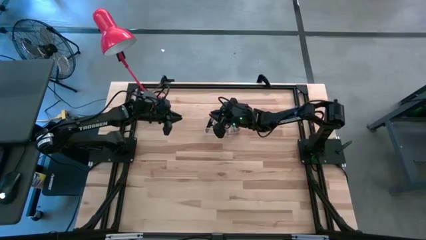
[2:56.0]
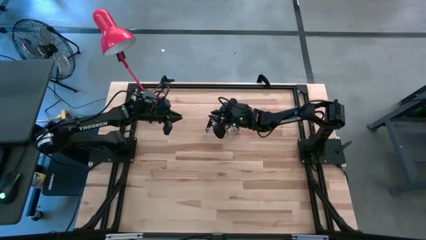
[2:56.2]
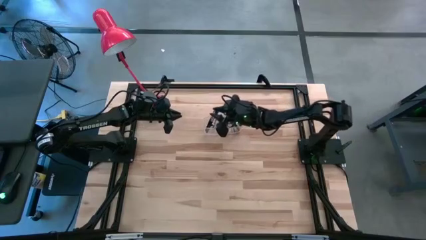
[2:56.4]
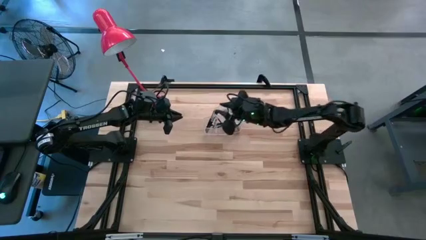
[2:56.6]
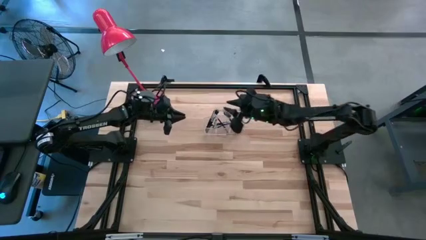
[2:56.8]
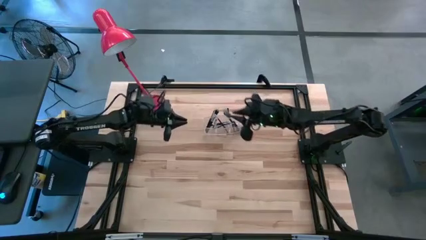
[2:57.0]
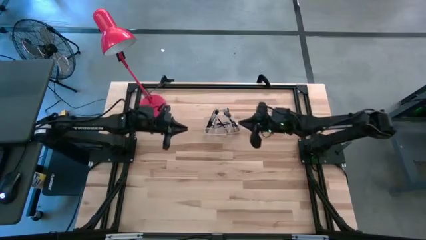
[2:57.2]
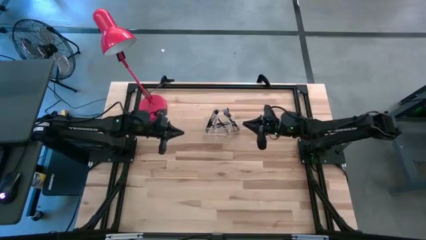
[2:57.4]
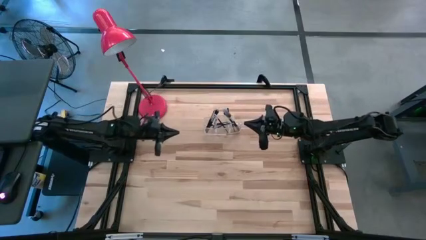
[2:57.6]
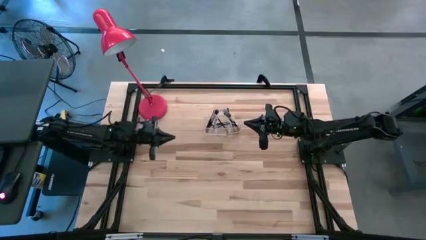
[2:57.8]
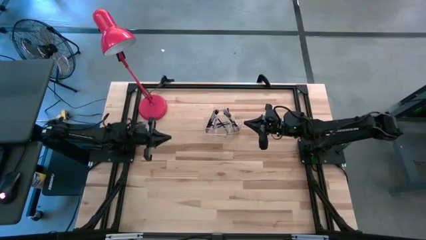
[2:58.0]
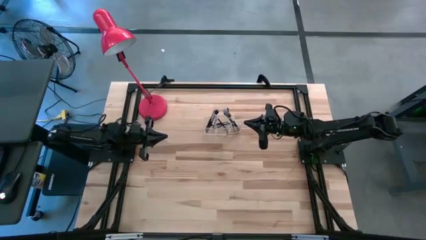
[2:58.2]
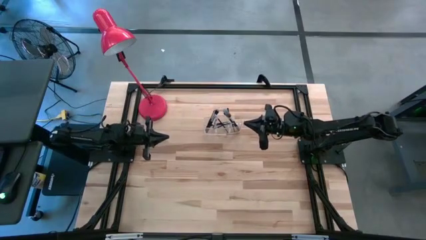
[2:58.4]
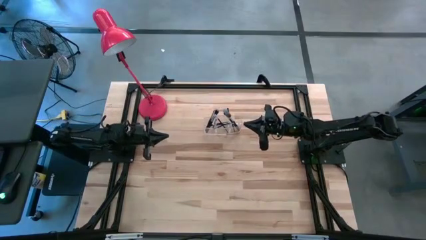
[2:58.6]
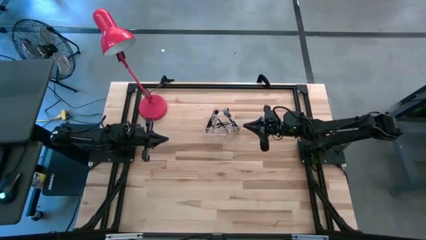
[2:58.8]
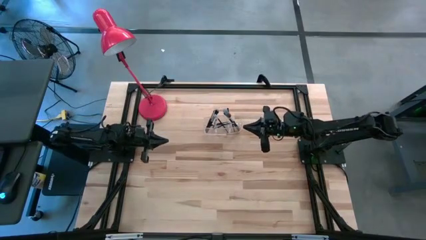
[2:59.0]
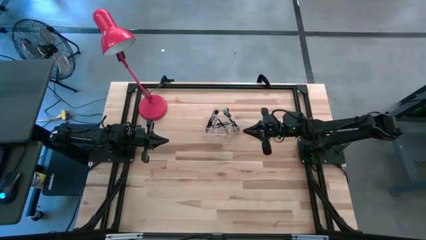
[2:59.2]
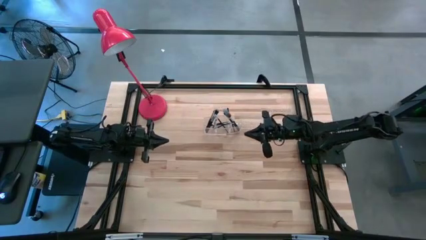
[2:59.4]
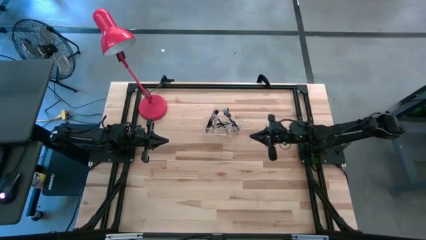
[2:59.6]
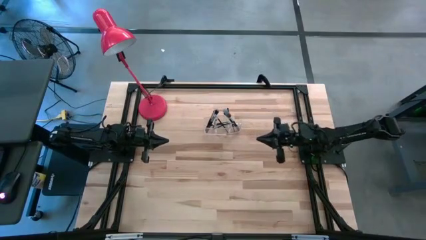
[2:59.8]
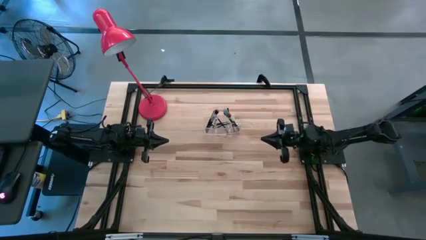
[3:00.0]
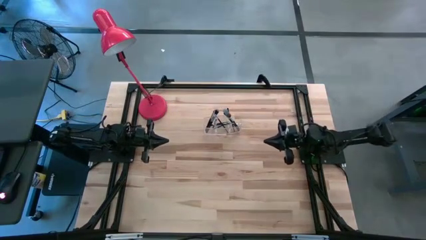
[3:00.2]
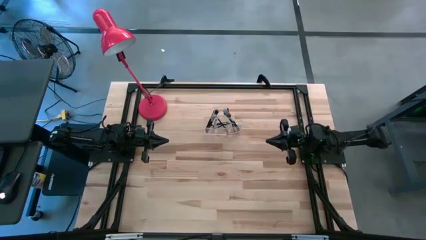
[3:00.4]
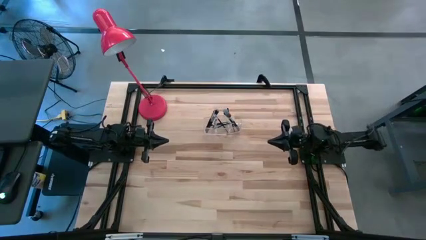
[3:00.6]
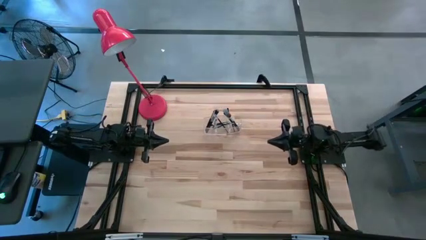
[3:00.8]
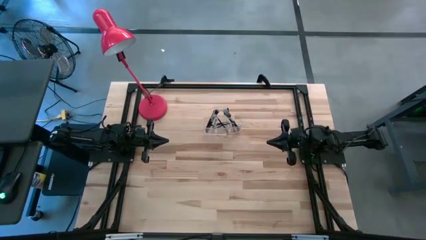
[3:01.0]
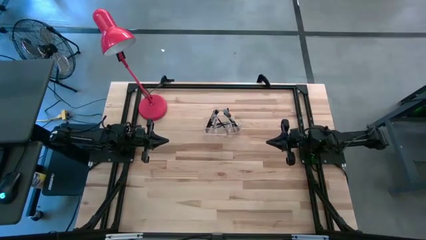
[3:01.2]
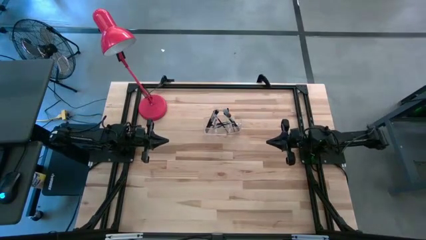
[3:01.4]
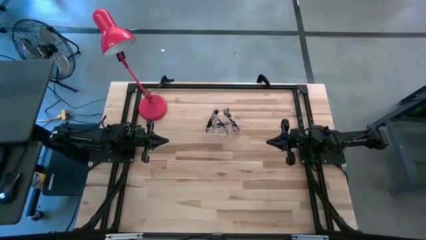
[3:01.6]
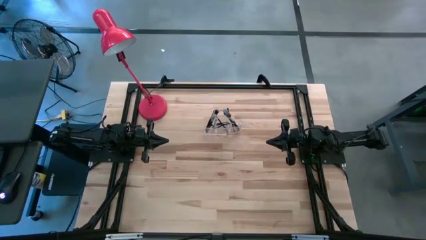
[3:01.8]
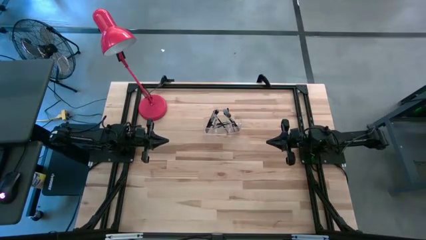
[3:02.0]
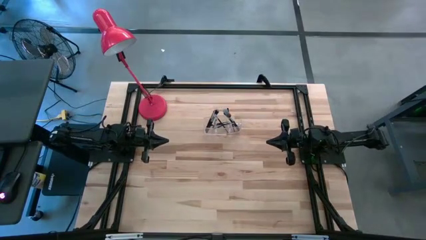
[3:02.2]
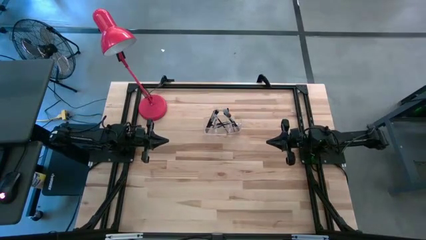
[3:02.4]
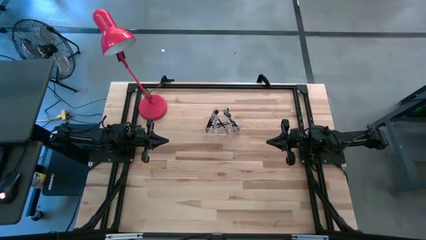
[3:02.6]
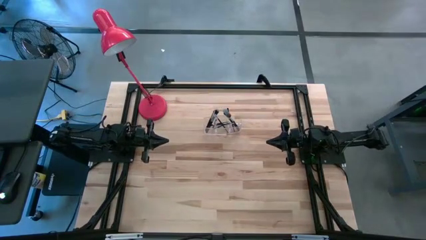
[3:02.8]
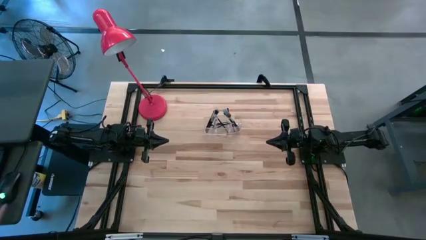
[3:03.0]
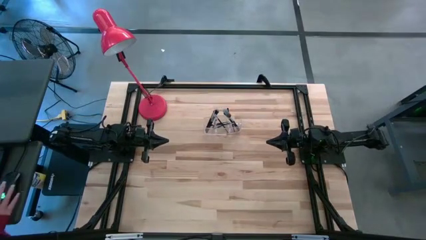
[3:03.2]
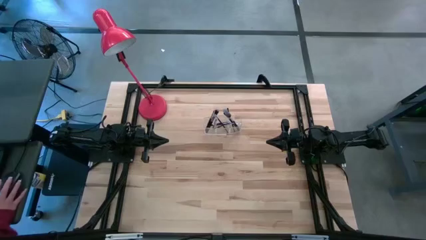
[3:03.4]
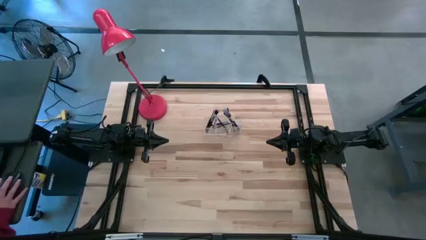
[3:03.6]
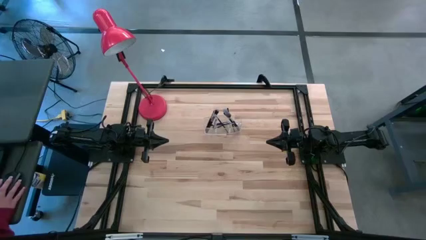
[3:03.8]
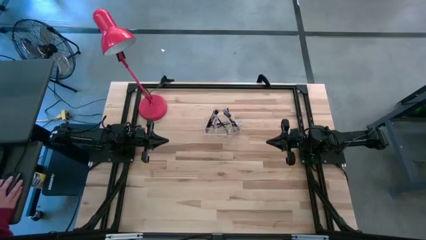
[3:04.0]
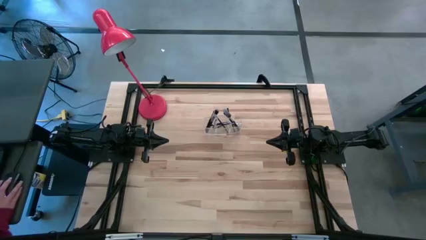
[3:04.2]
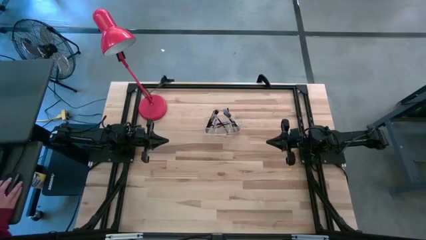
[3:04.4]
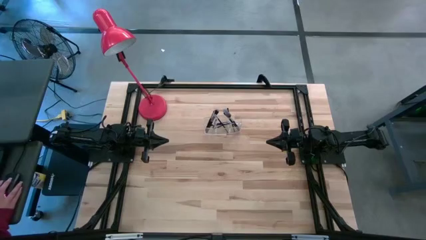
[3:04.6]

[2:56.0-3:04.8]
Task: Pick & Place Makeup Supplies
Return to Home Position

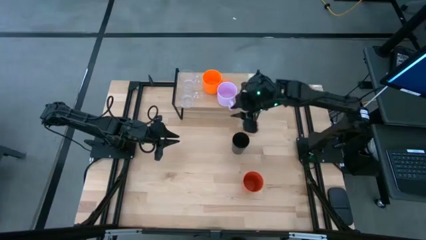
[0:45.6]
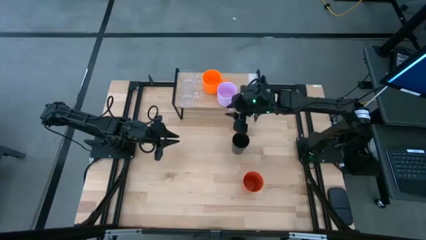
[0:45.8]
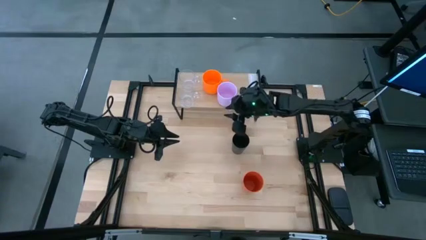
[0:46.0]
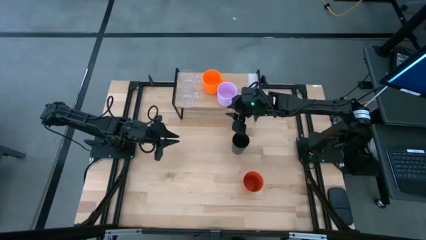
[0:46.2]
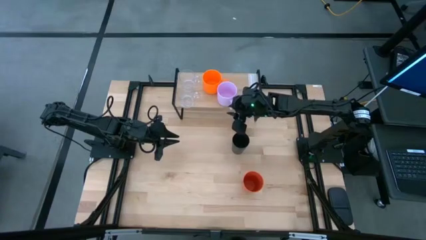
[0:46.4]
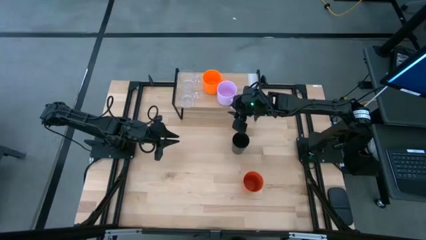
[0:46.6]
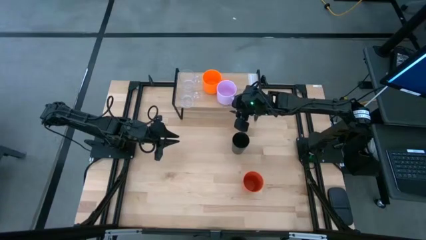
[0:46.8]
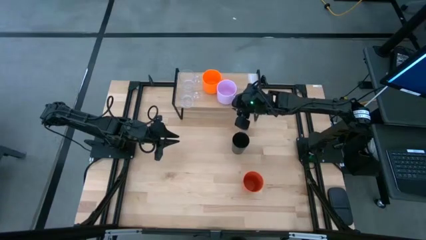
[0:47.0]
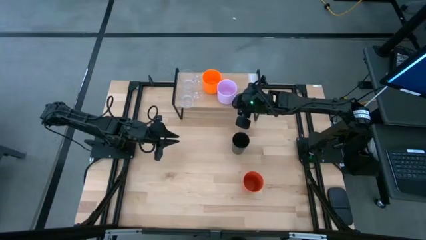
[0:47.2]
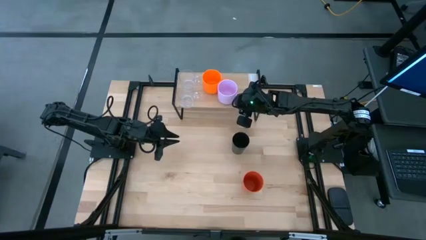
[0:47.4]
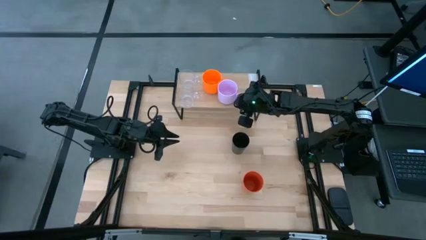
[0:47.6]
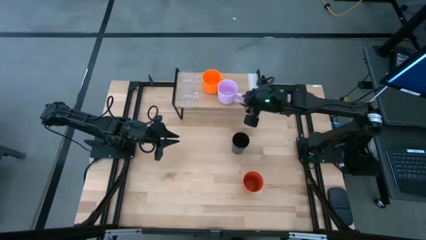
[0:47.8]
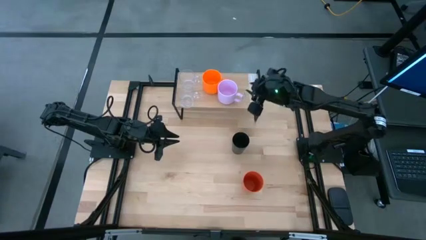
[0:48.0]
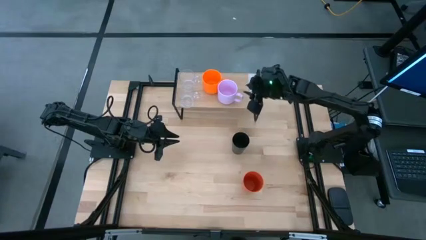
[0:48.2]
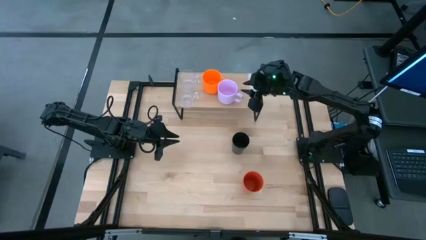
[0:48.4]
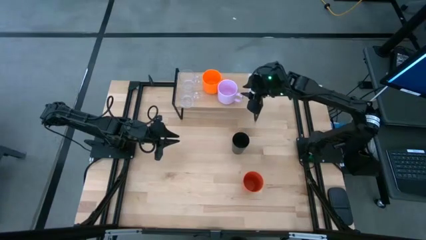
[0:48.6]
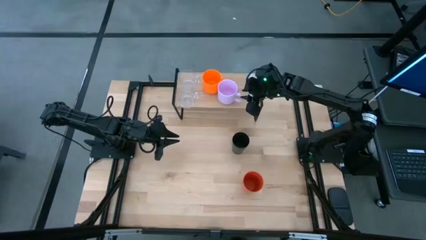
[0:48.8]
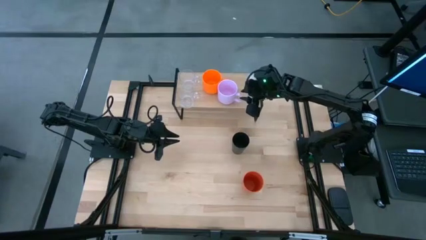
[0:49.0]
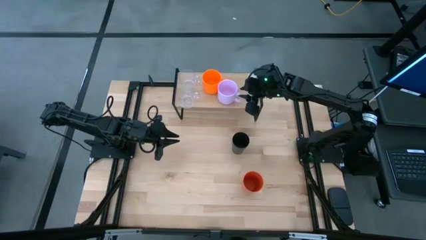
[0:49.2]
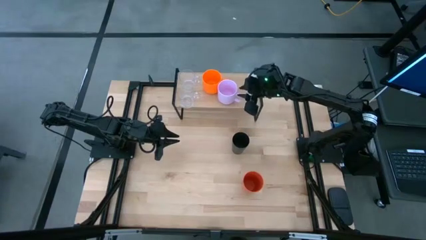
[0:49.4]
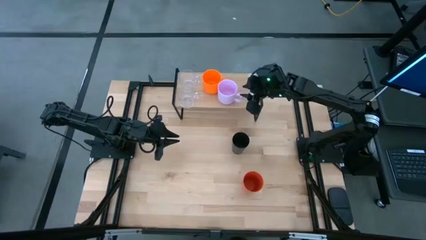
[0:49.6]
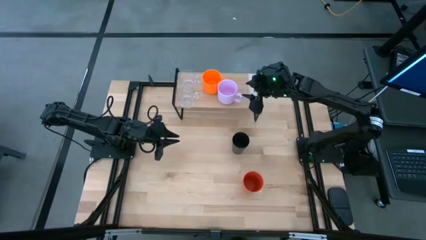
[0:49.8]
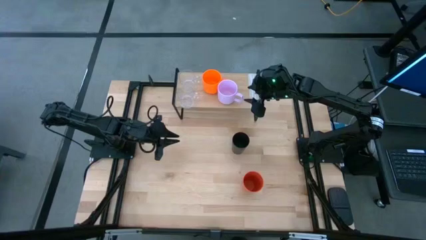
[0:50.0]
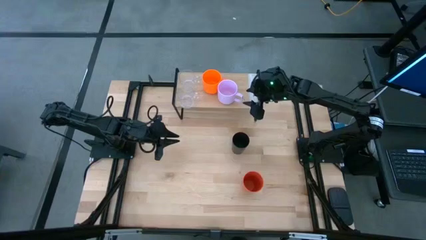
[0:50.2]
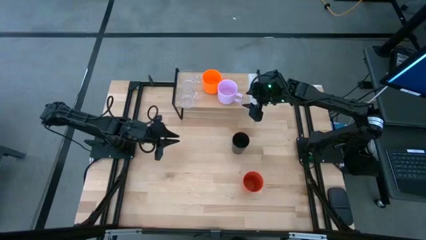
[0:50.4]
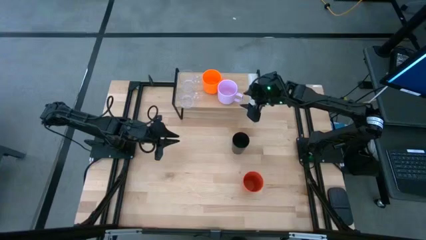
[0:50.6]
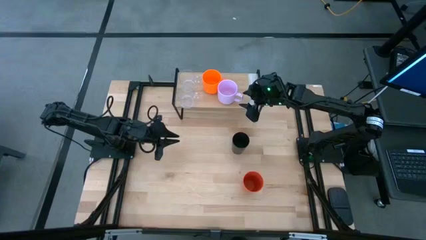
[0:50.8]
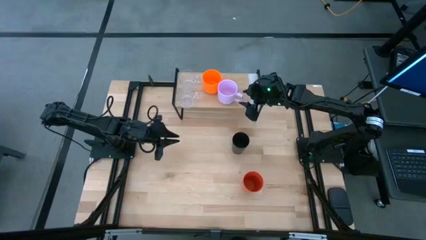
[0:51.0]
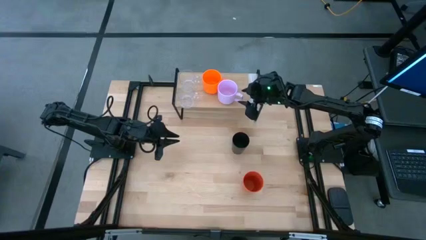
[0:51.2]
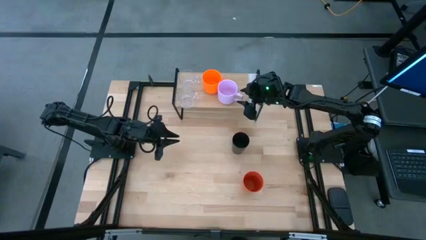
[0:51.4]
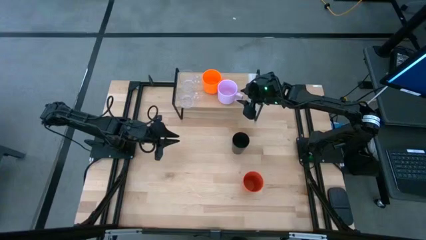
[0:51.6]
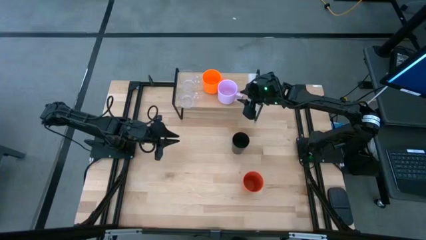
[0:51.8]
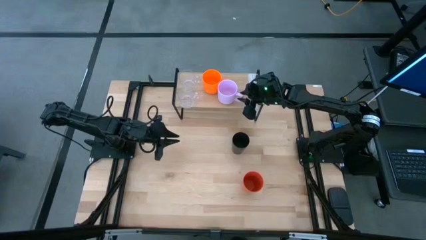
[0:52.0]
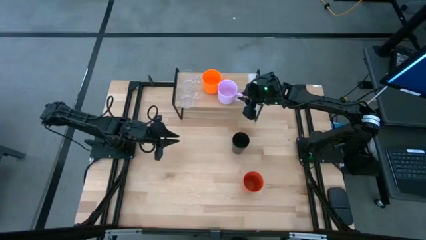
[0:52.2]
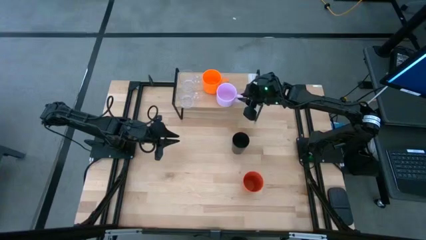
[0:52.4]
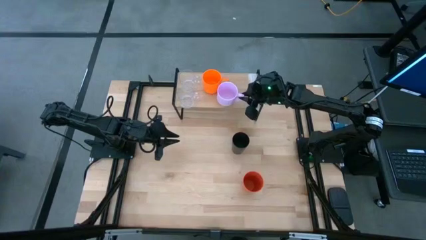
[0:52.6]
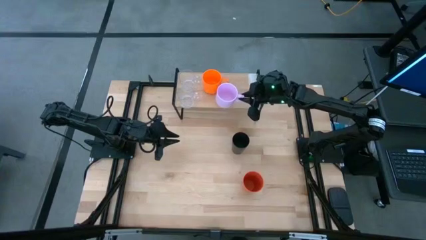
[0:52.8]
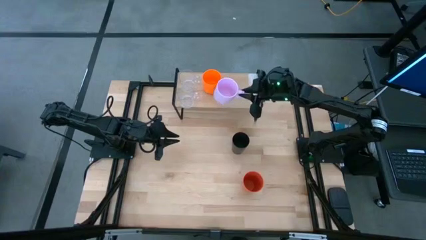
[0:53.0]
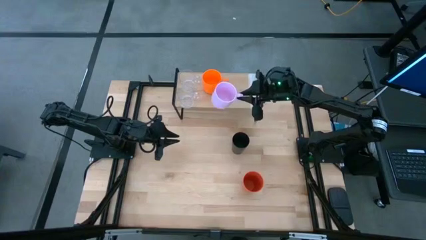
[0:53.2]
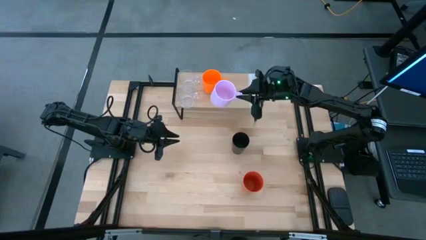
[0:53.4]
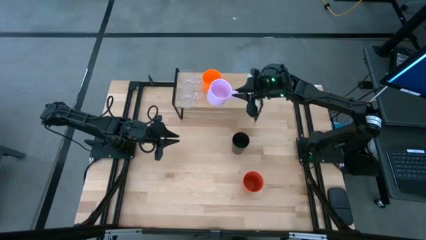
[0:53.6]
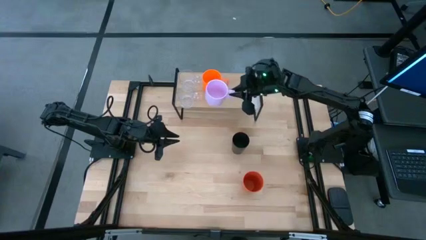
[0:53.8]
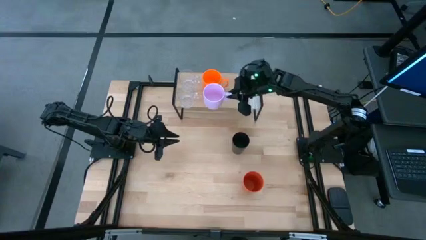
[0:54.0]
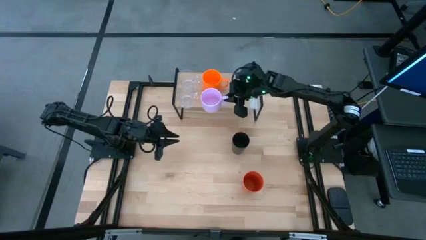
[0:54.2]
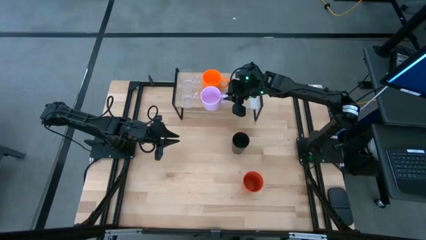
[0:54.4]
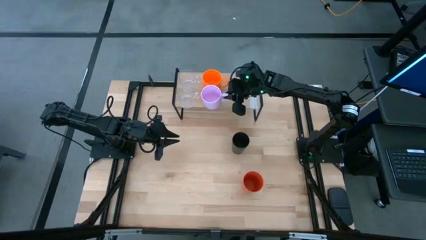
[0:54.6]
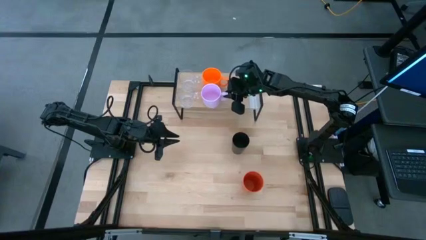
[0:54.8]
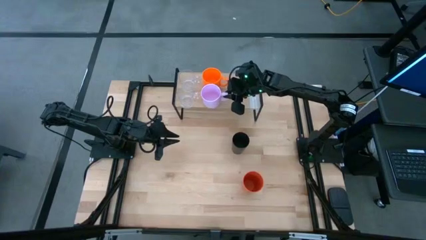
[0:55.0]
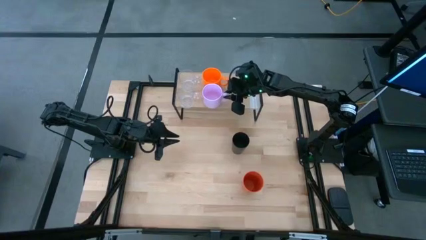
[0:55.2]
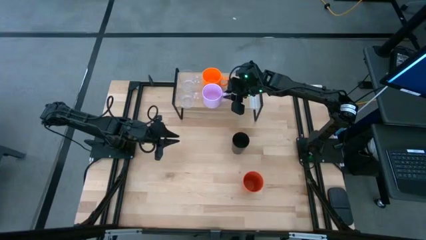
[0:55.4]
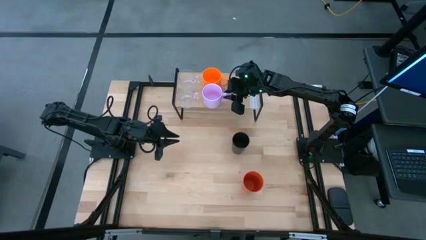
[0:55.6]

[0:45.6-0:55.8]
Task: Stack small to large cups/mugs on shelf
Put the pink mug on top of the shelf
